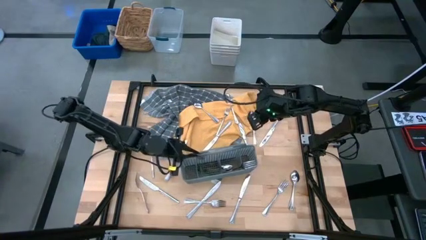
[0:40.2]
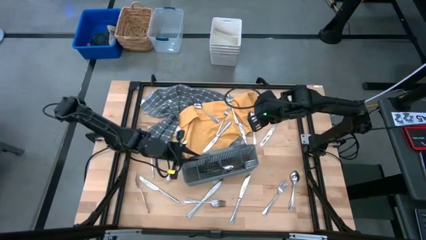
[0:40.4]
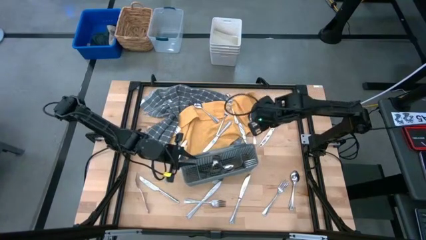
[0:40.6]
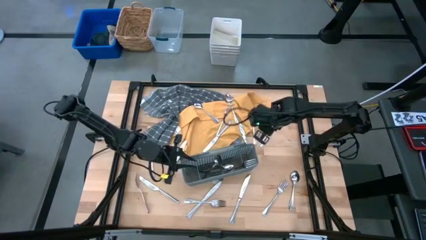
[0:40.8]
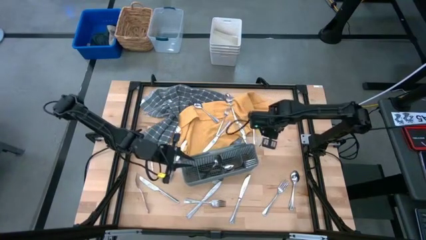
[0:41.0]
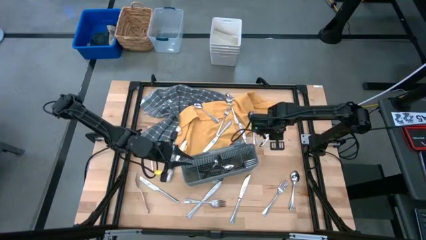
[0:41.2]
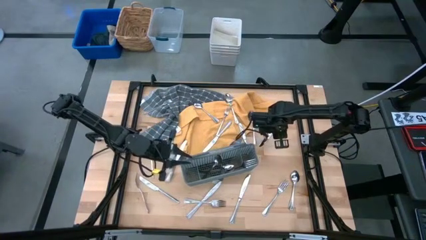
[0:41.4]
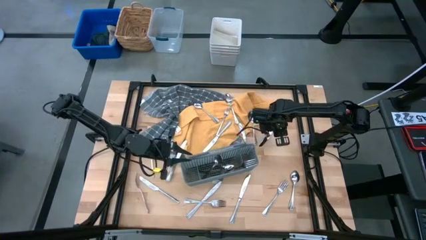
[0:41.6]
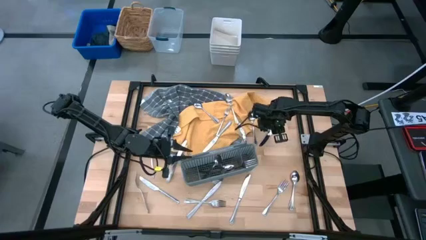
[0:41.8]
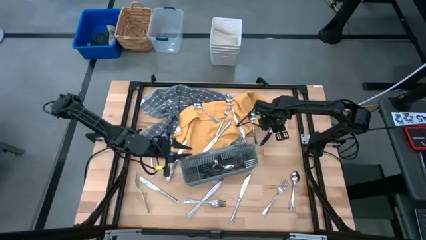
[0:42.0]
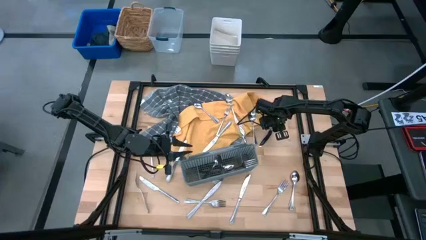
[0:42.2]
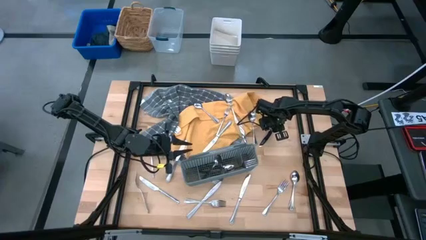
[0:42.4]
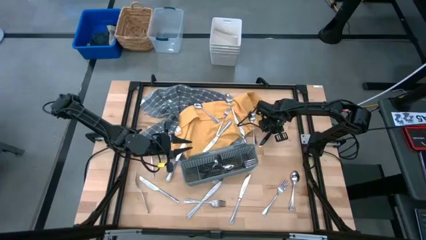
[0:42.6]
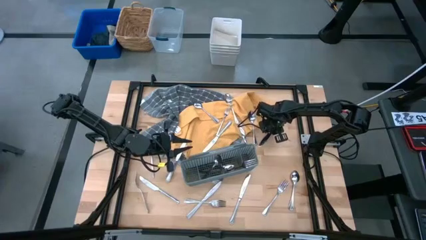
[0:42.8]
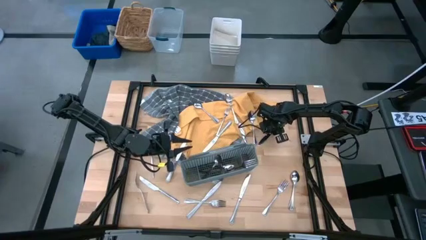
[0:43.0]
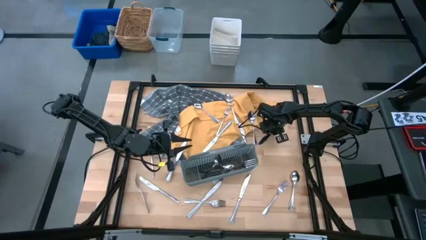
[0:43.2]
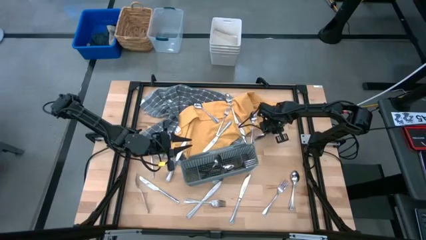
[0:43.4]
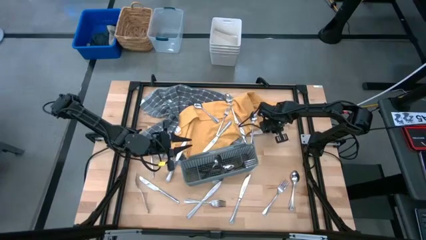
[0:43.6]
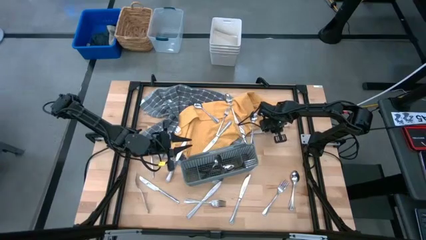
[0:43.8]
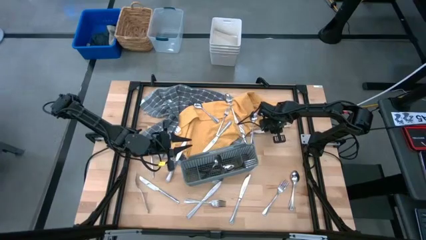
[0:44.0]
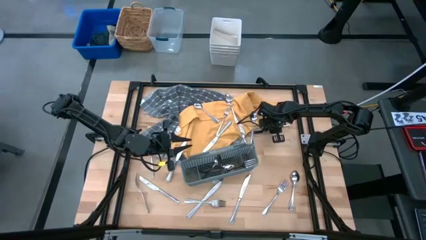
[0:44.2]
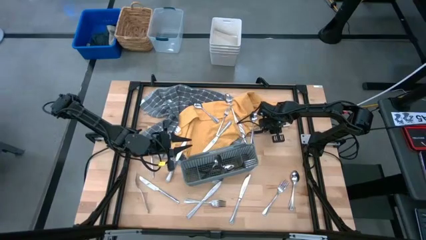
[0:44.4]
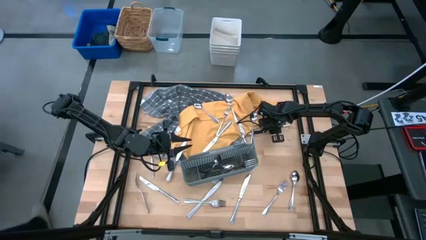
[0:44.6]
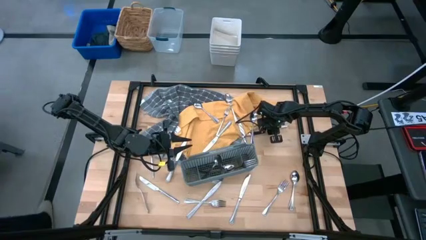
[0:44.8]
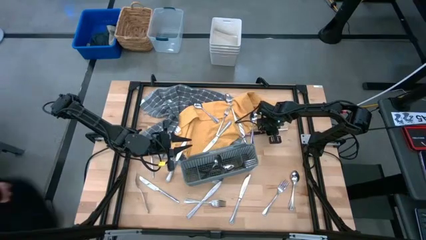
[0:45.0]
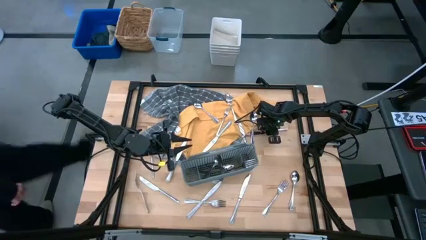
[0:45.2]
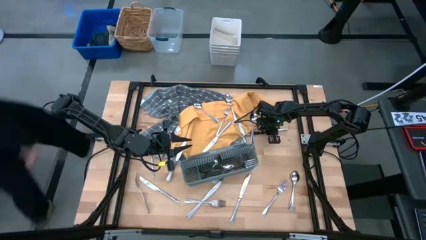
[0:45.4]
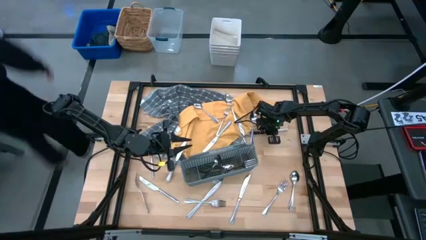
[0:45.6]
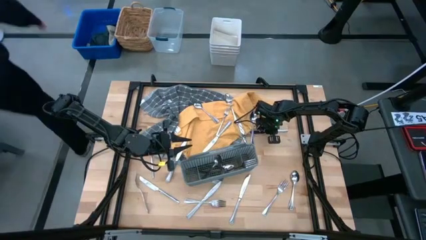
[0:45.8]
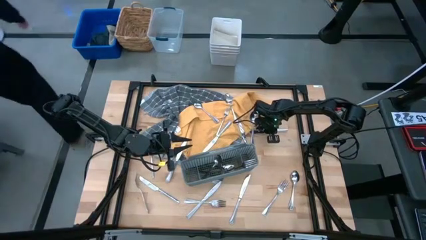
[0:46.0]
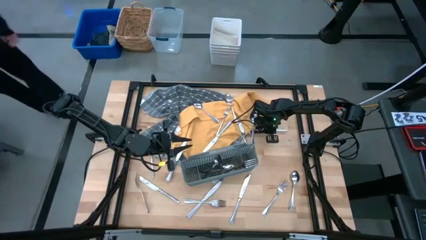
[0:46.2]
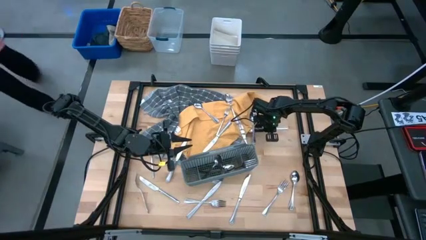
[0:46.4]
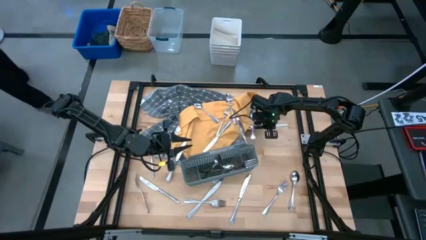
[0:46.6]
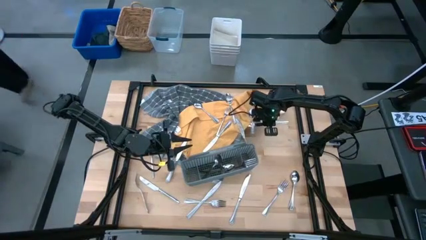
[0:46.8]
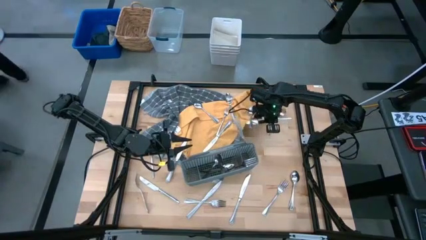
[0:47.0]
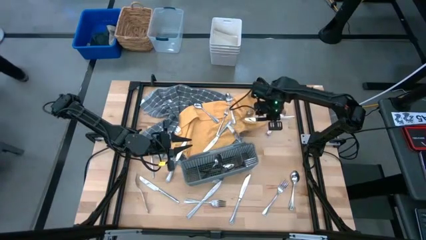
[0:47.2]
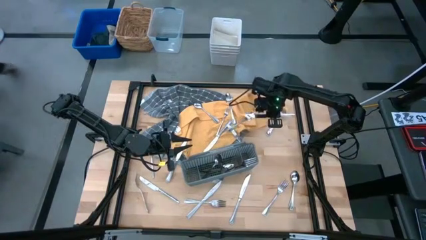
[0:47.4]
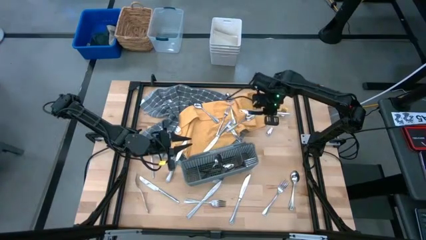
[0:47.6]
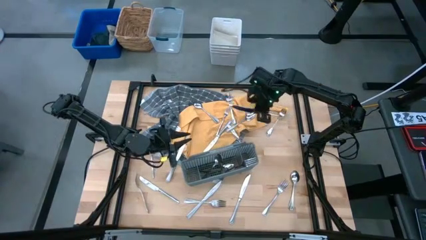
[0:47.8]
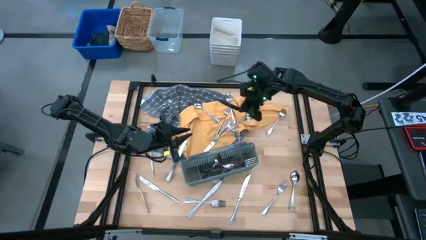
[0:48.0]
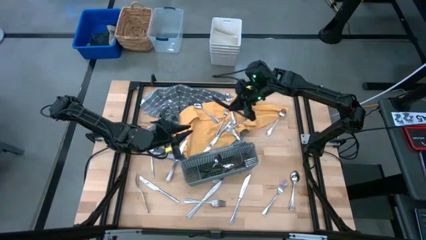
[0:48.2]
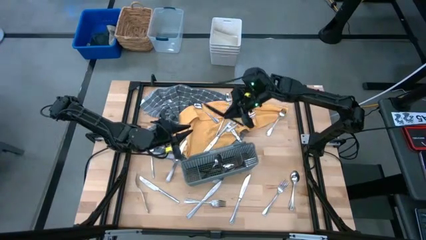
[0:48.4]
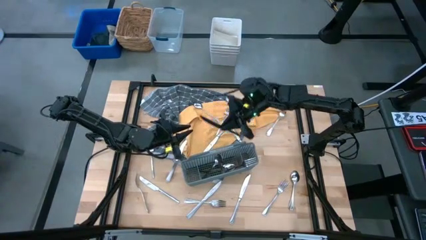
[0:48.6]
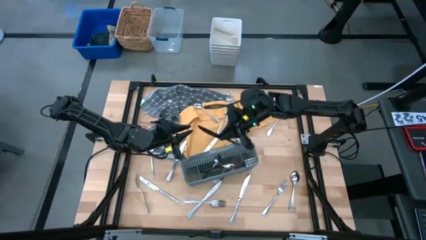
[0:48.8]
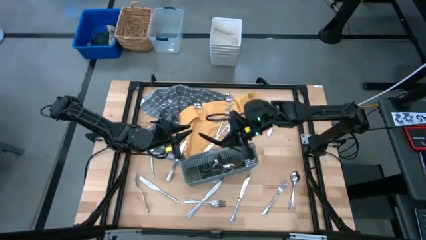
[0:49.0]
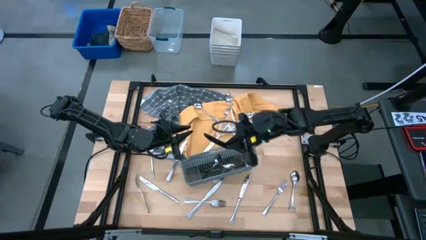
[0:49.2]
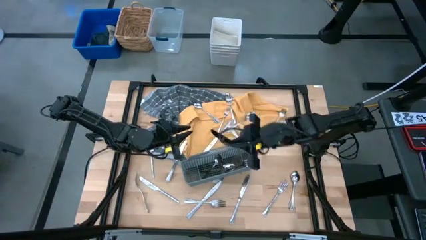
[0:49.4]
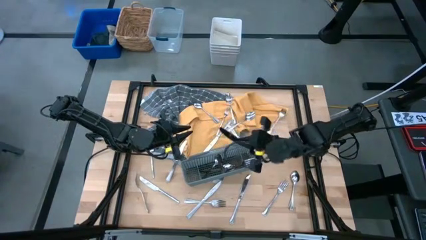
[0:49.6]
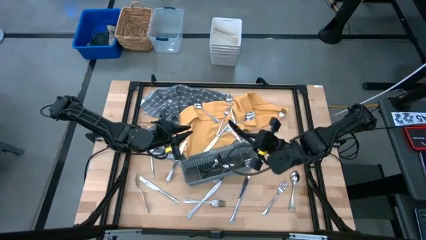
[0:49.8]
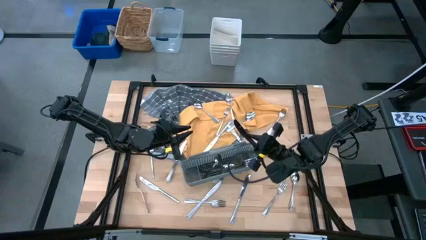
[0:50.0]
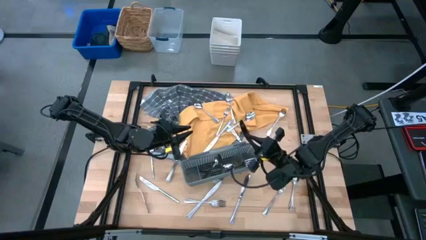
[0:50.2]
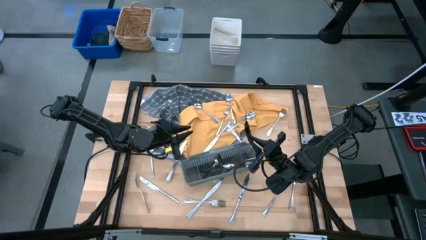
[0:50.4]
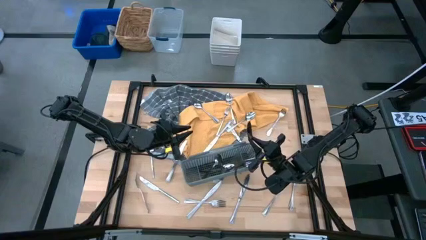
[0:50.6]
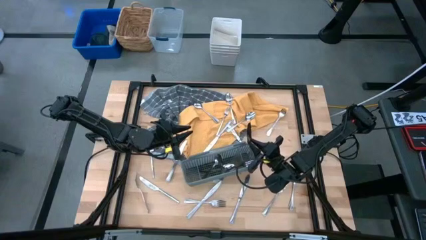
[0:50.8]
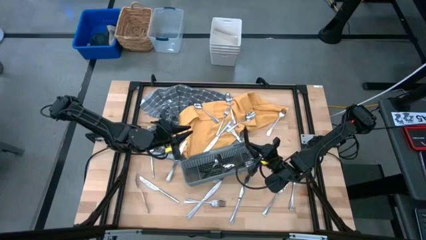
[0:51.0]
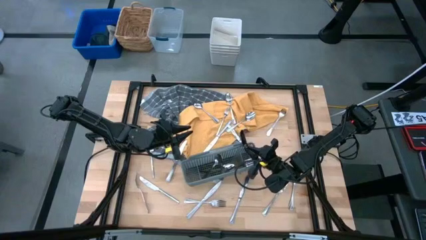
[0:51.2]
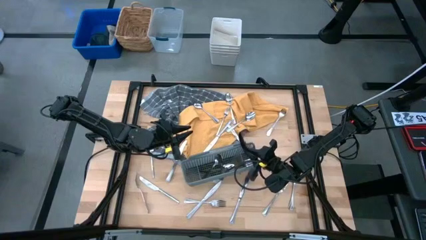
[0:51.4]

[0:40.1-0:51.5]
Task: Sort silverware
Put the silver knife into the gray silverware basket
